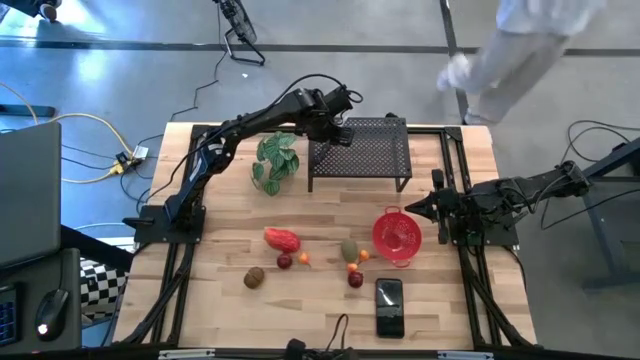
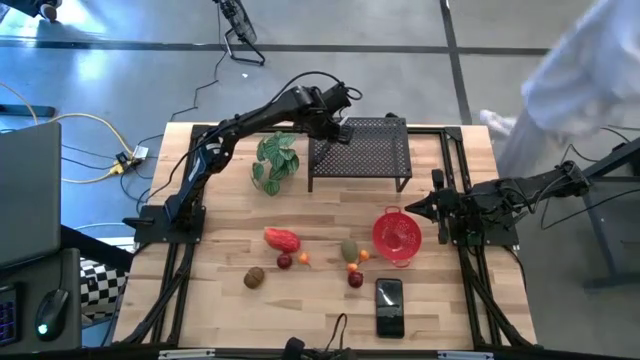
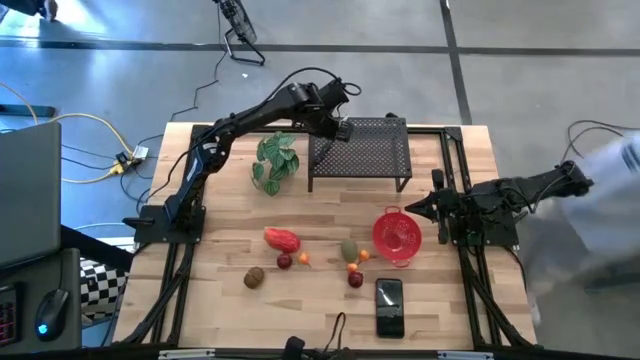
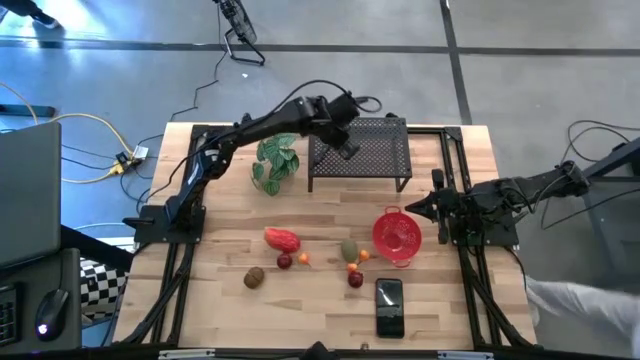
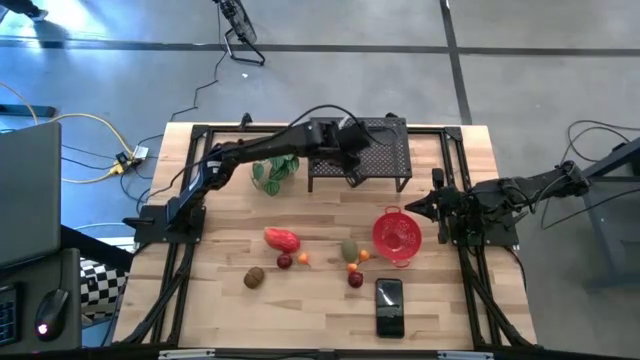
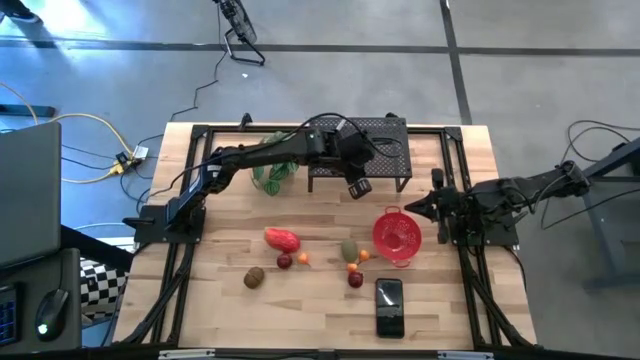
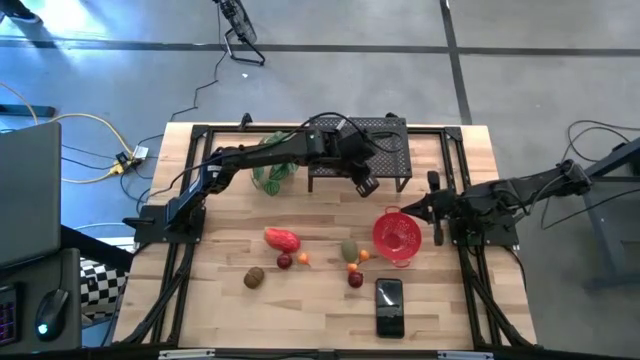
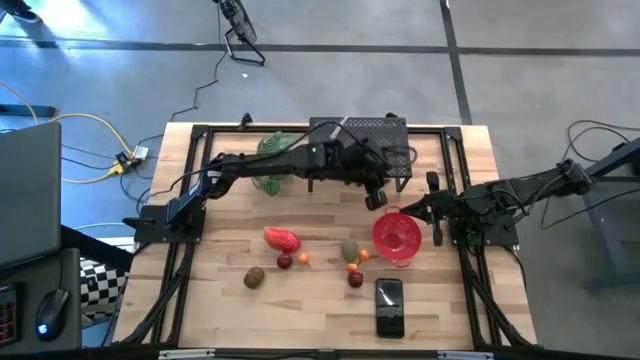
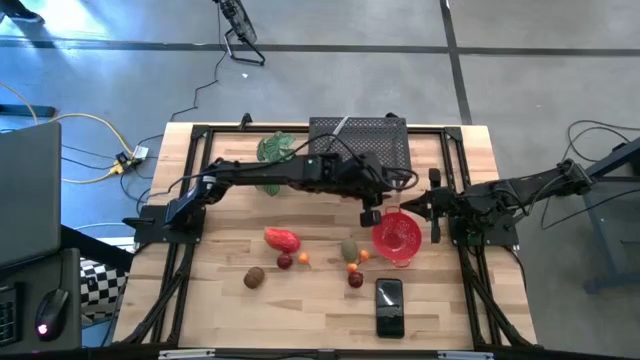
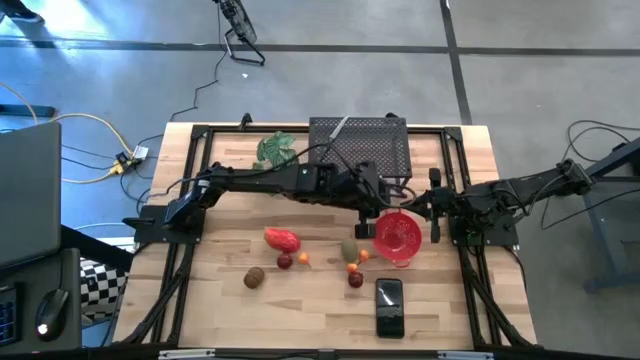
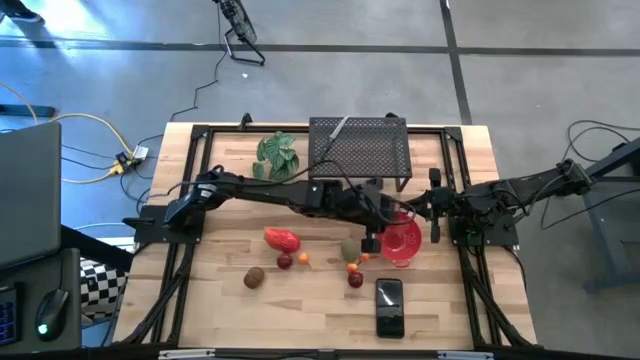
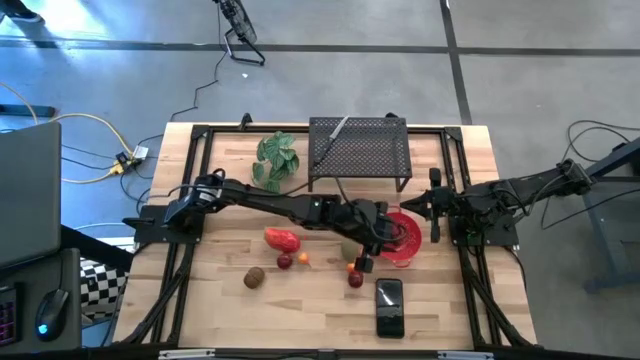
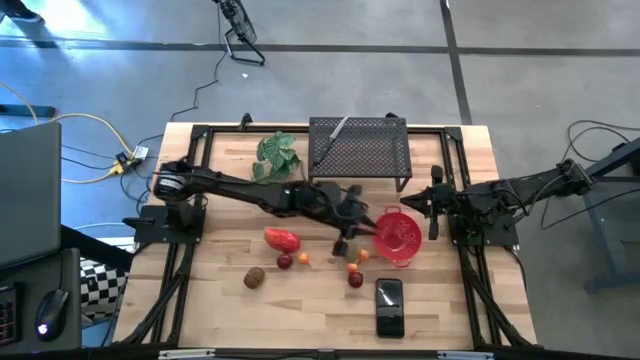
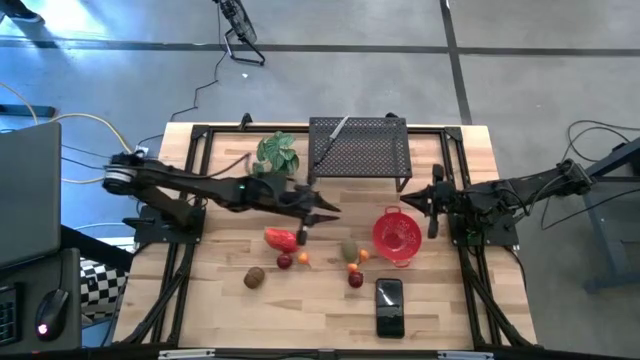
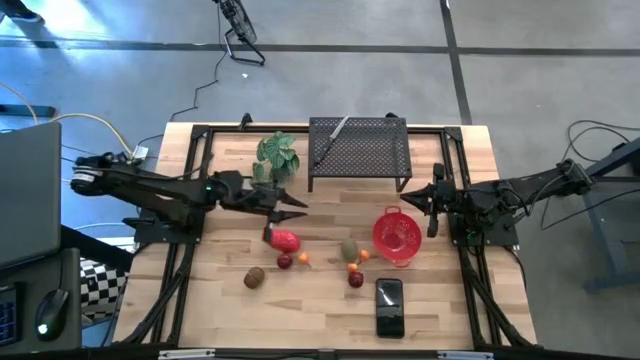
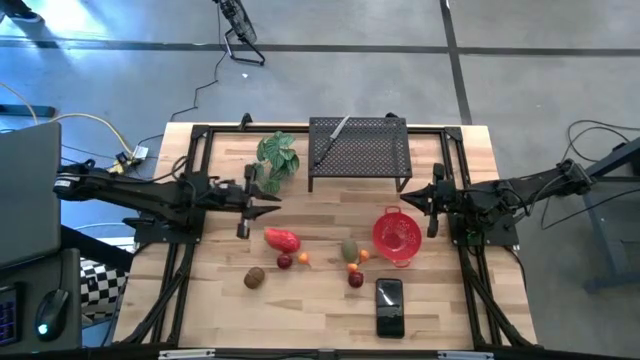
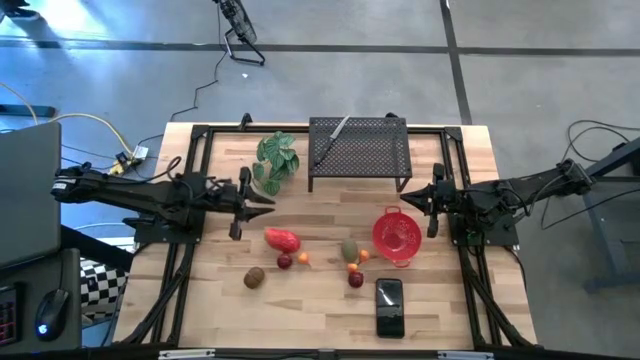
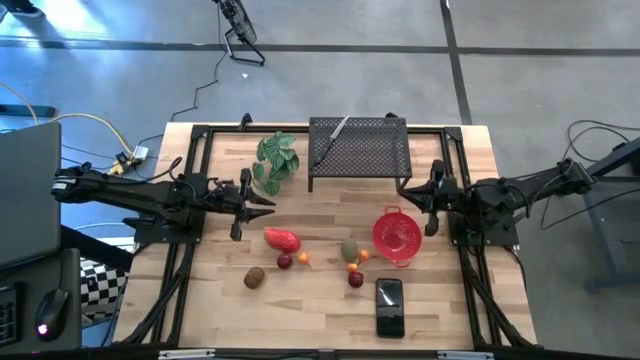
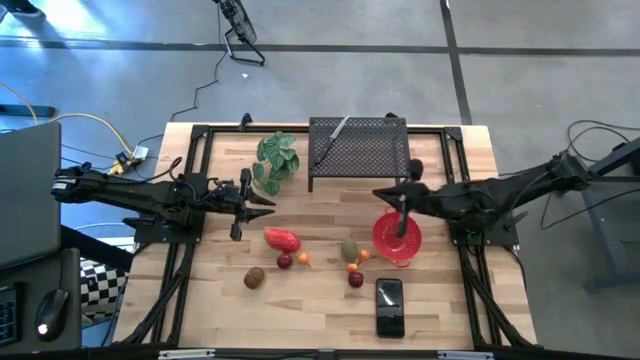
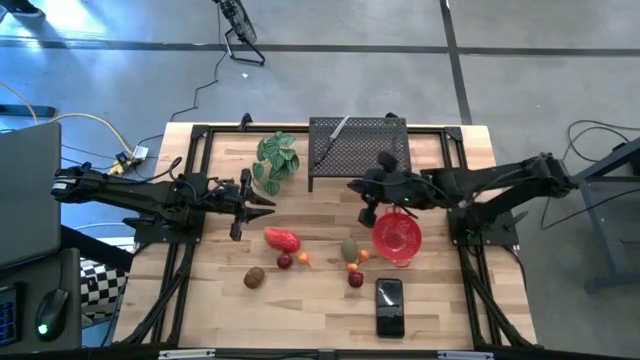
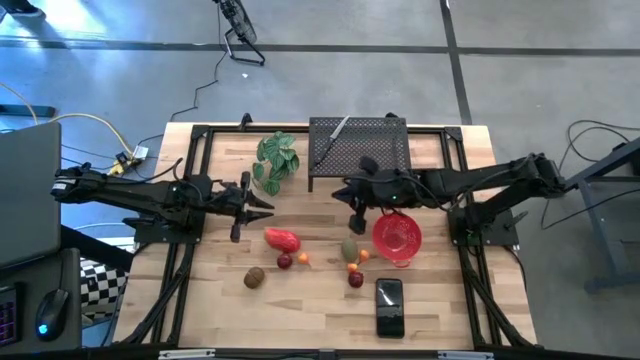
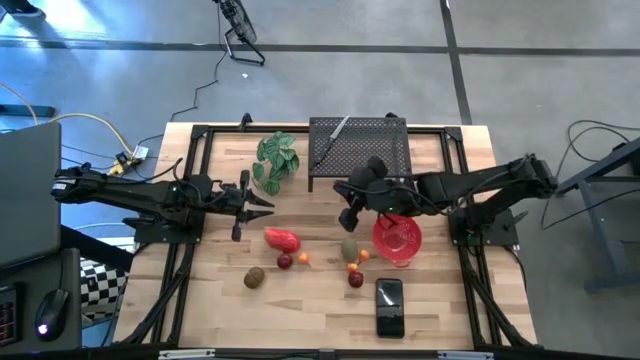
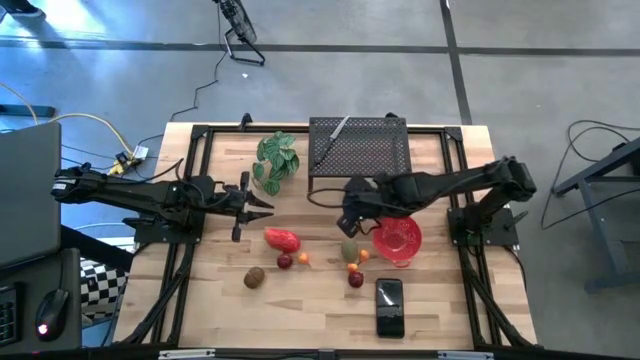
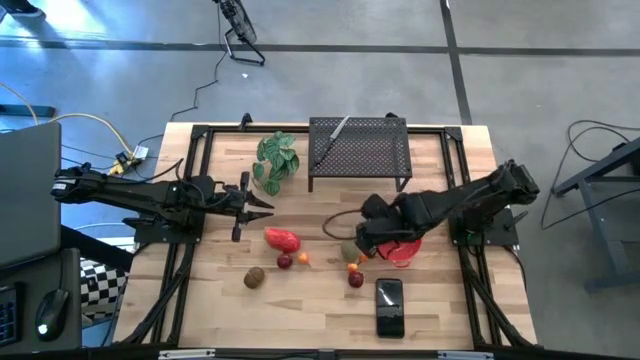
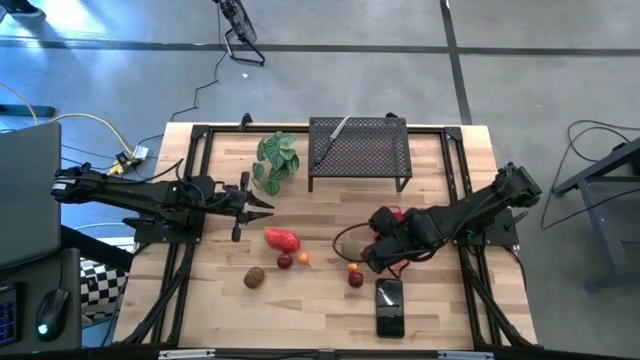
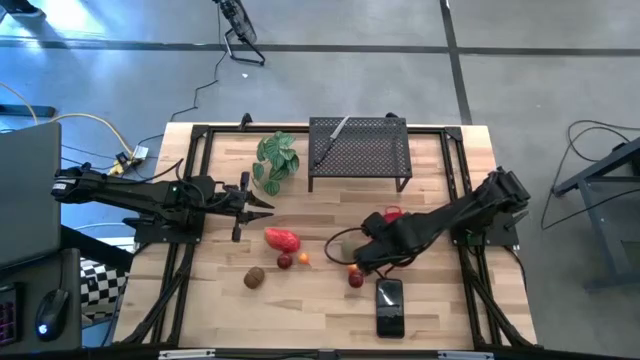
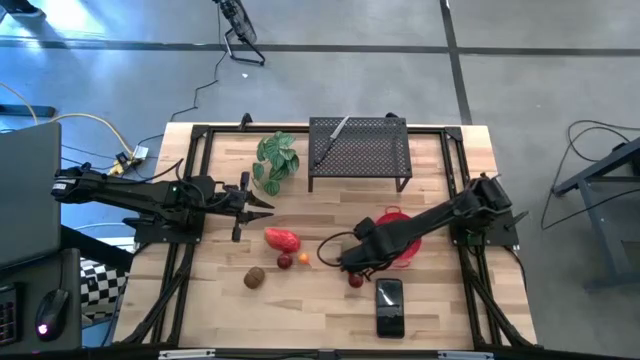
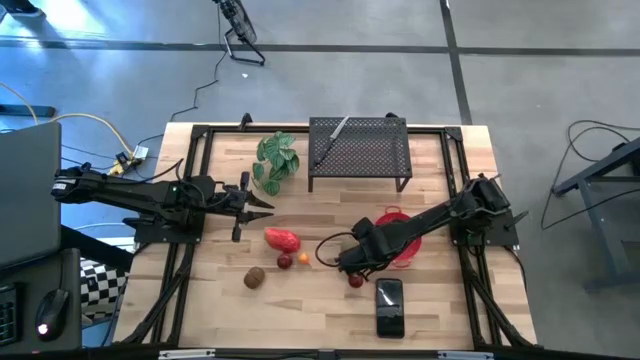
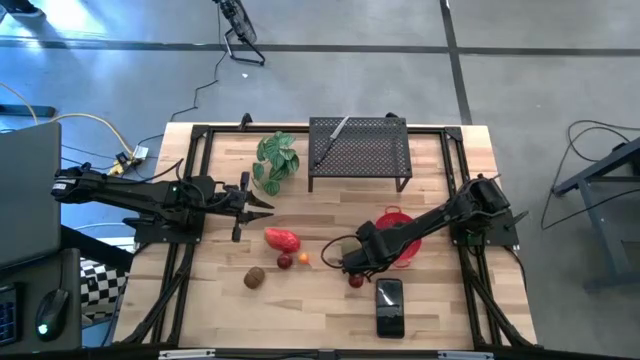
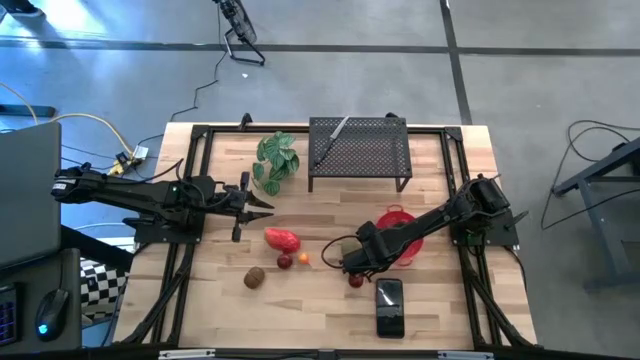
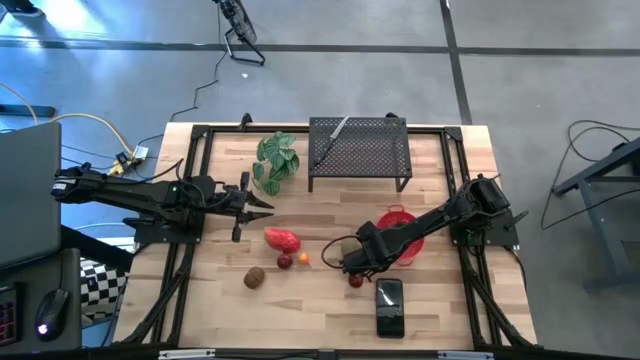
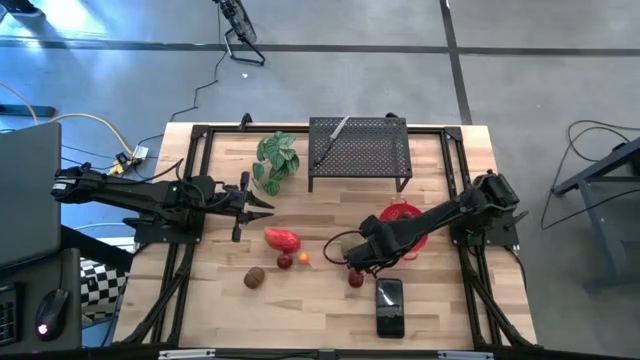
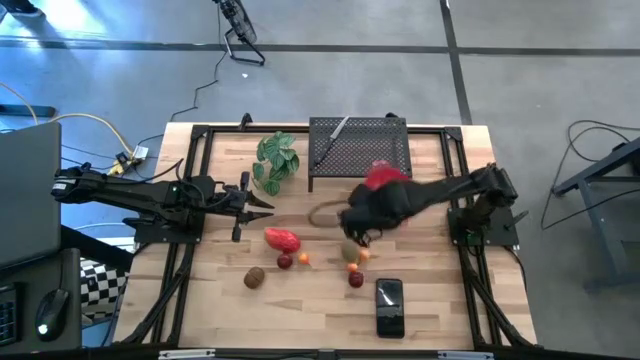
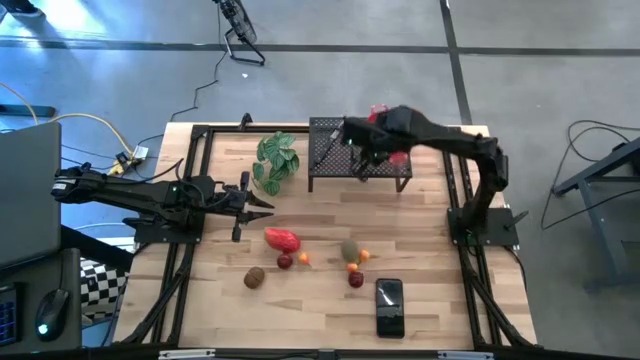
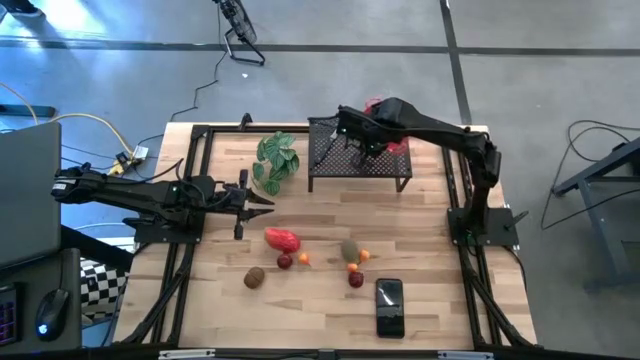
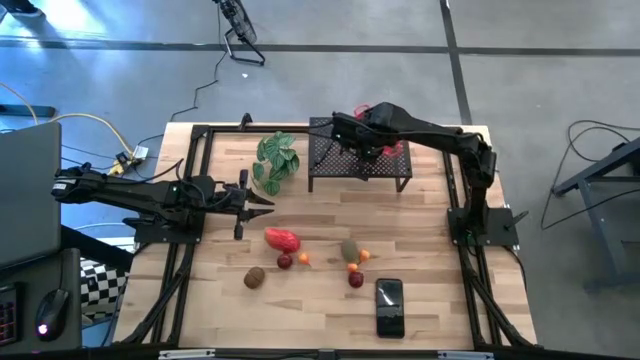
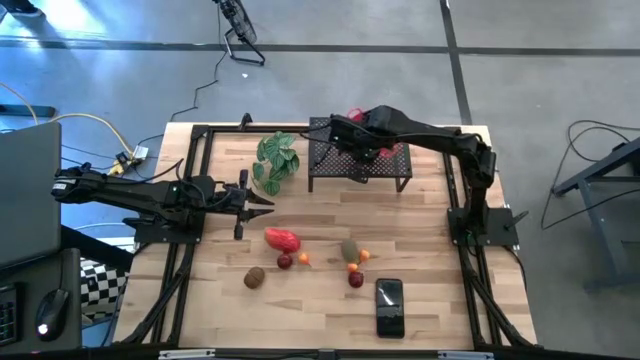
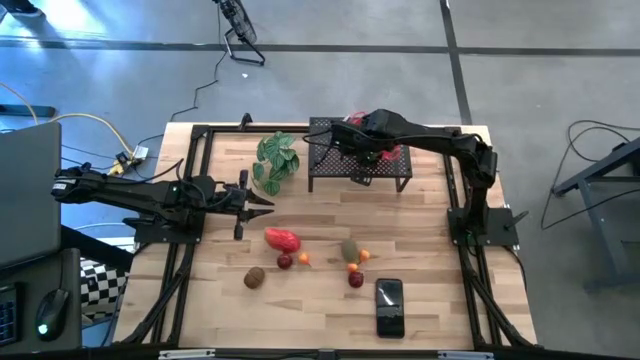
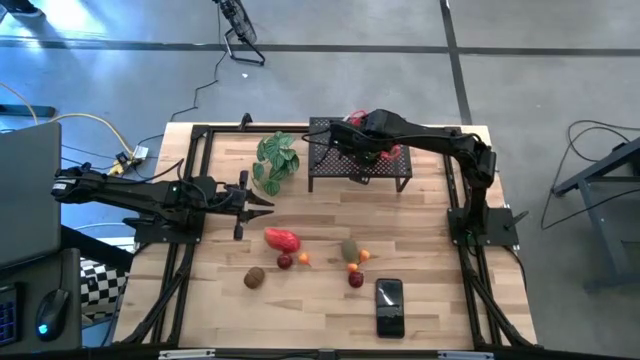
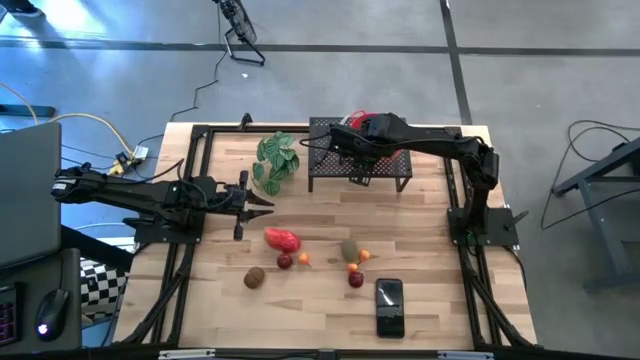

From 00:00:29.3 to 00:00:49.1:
Task: Pick & Place Fruit
Put the red strainer bowl on the shelf
